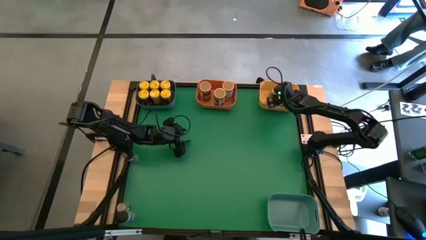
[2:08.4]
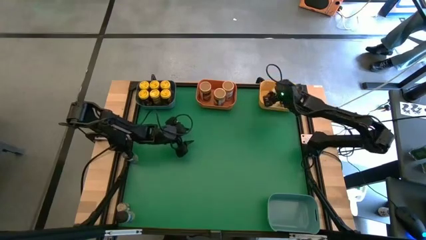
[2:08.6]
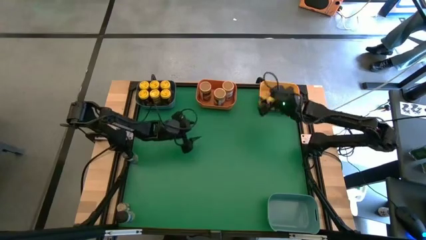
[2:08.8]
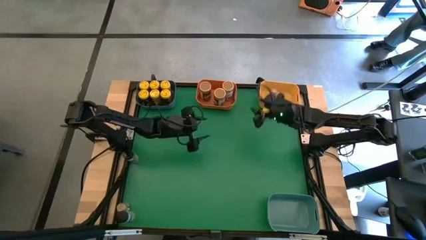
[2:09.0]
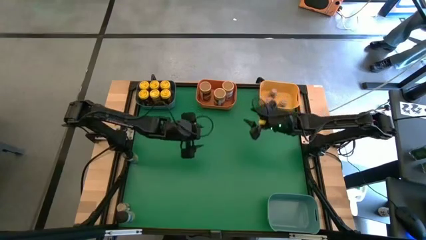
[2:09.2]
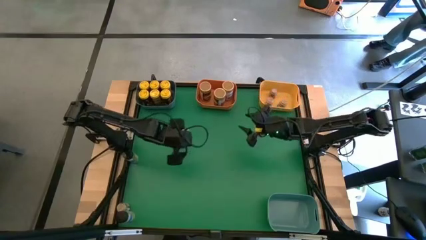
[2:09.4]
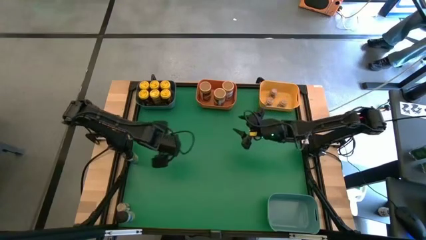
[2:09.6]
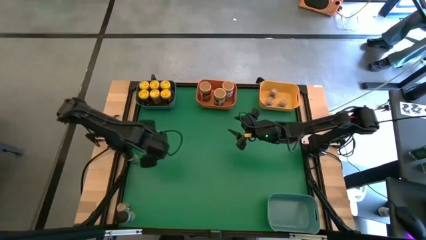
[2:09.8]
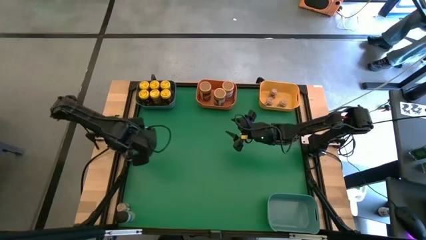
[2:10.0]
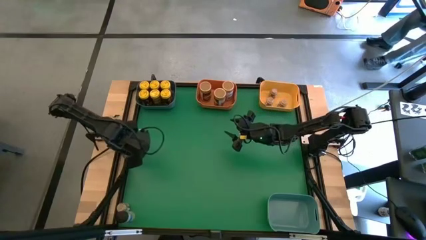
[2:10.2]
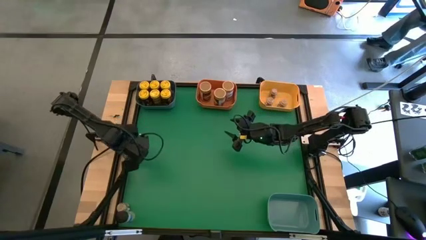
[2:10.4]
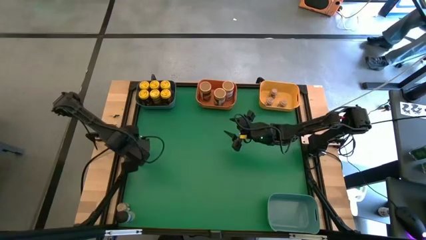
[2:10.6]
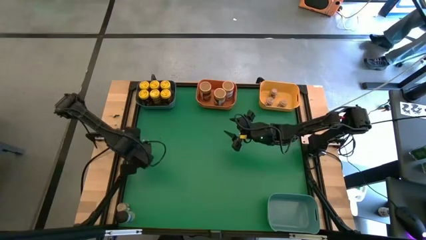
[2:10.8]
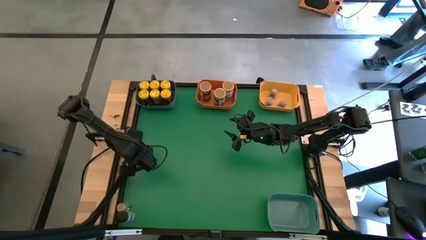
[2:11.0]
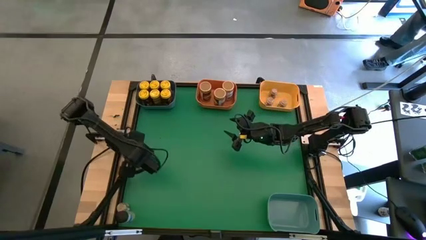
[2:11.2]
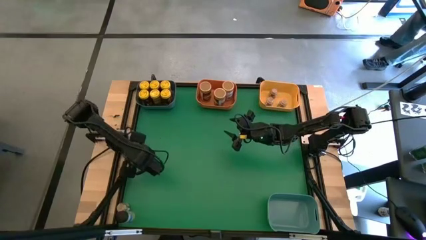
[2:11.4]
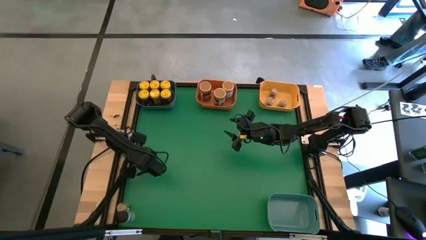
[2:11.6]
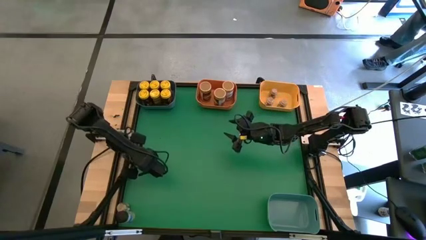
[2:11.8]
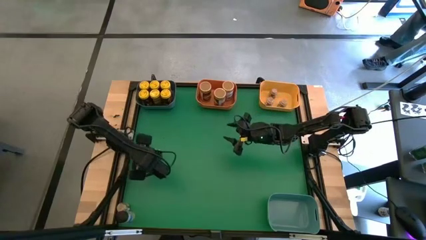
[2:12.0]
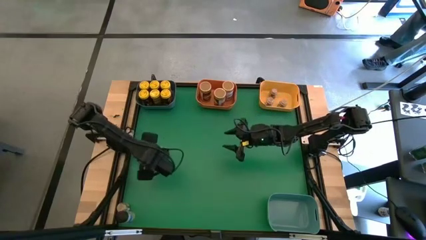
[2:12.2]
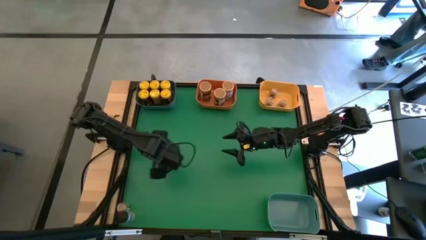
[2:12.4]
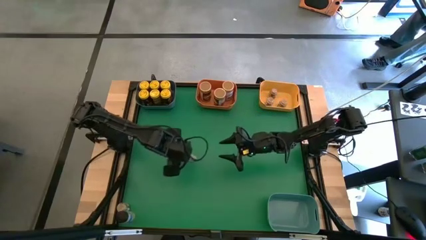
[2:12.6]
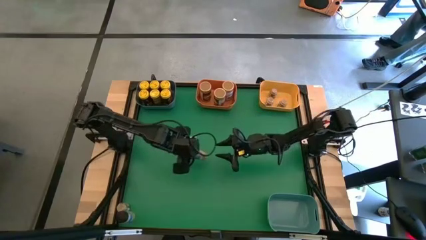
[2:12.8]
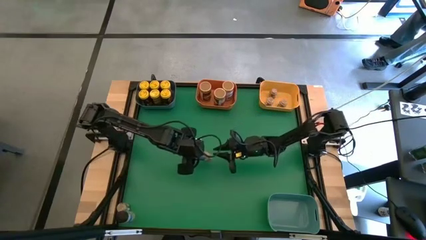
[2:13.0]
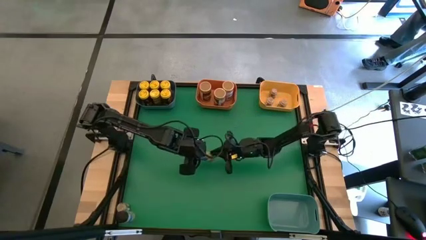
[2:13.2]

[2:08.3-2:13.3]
Task: Sort spices by type
Put the black seasoning bottle into the green bin

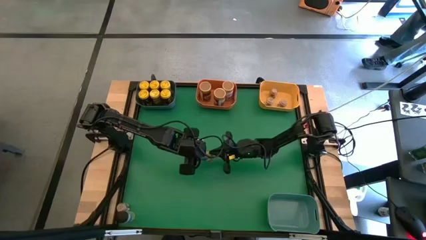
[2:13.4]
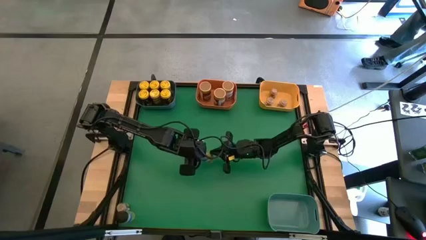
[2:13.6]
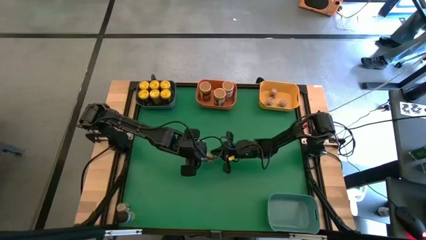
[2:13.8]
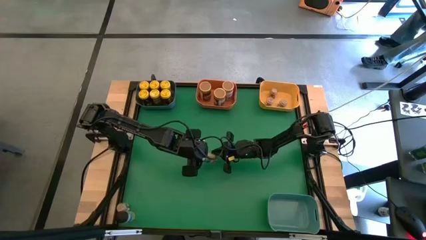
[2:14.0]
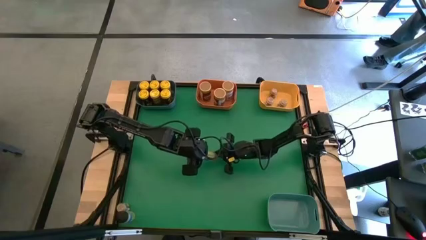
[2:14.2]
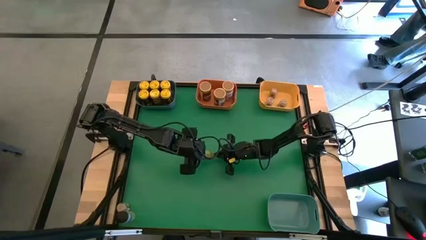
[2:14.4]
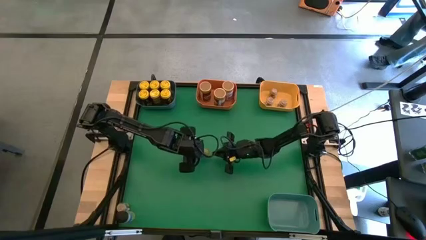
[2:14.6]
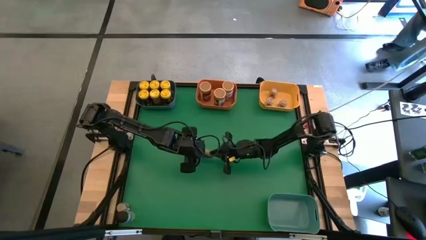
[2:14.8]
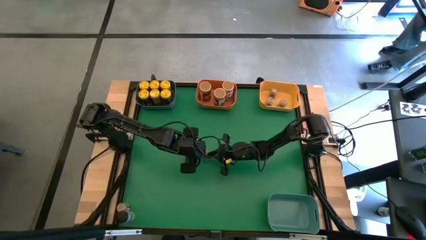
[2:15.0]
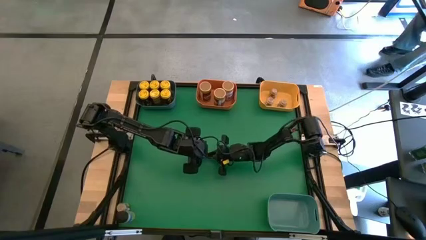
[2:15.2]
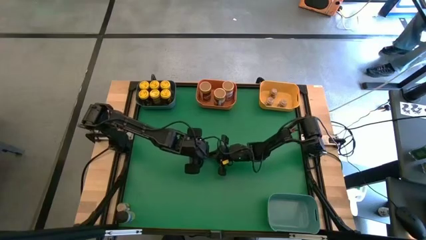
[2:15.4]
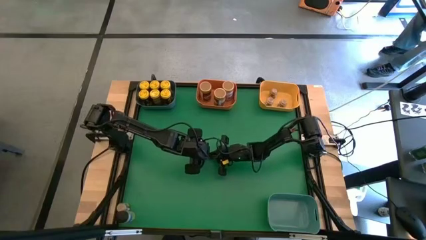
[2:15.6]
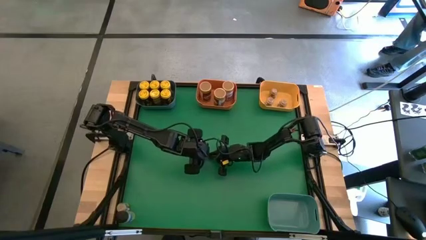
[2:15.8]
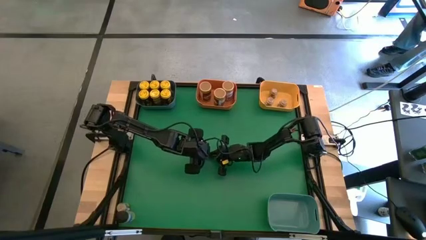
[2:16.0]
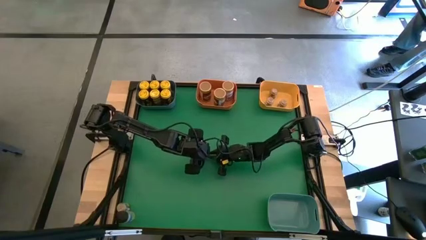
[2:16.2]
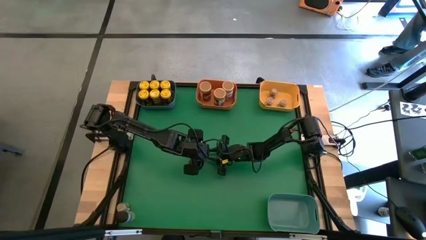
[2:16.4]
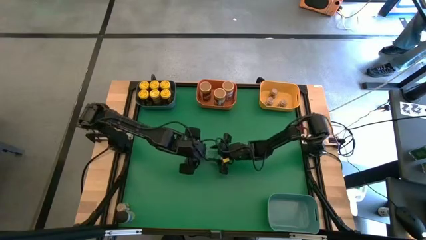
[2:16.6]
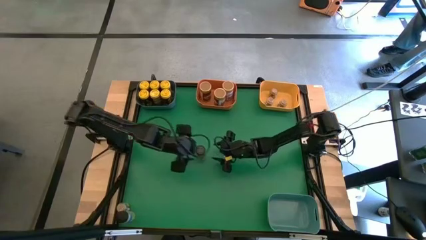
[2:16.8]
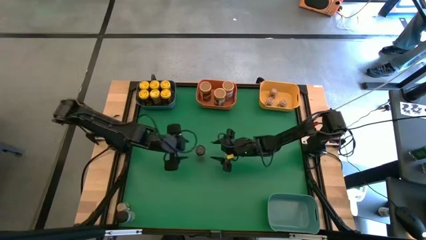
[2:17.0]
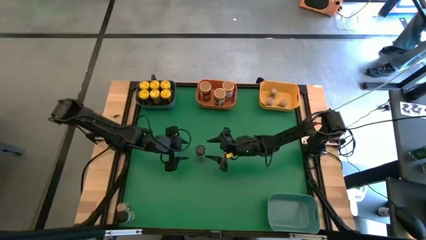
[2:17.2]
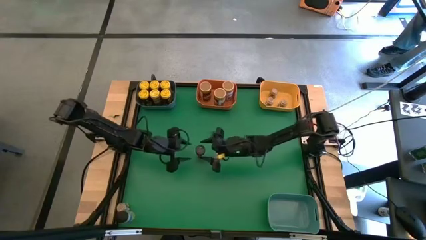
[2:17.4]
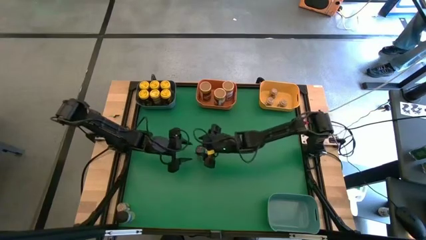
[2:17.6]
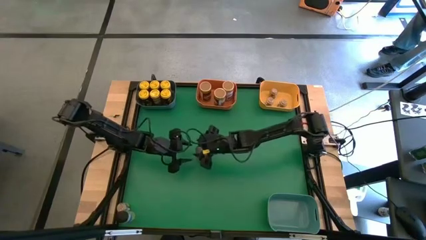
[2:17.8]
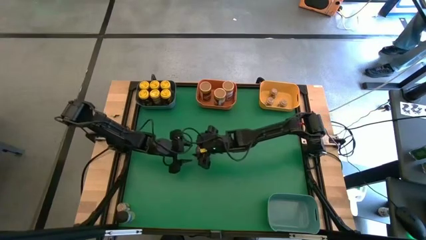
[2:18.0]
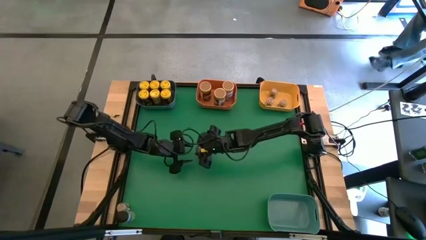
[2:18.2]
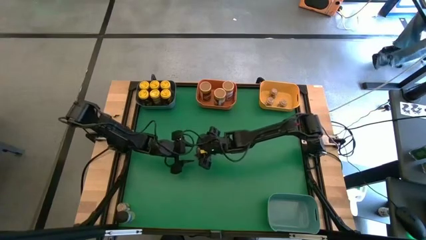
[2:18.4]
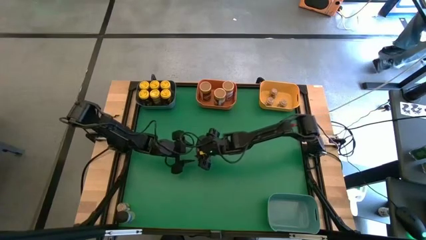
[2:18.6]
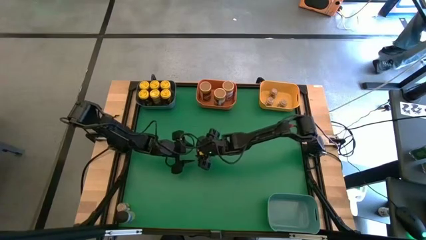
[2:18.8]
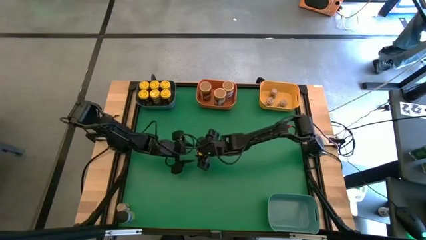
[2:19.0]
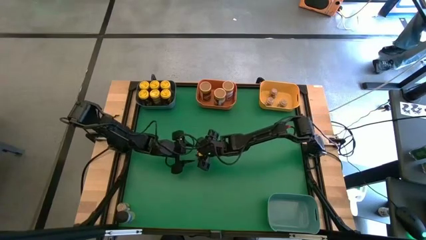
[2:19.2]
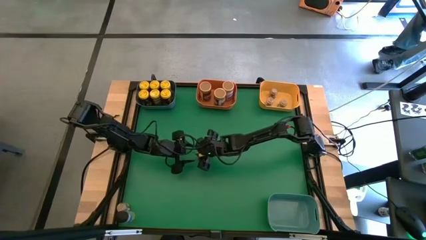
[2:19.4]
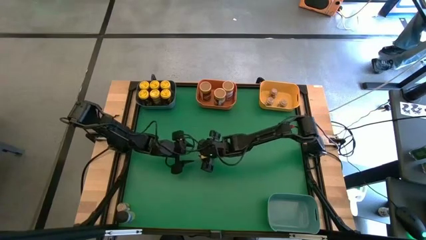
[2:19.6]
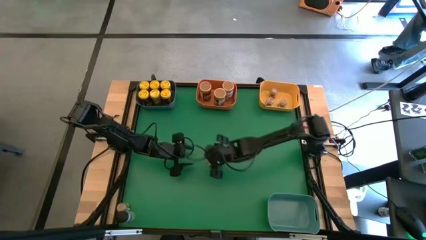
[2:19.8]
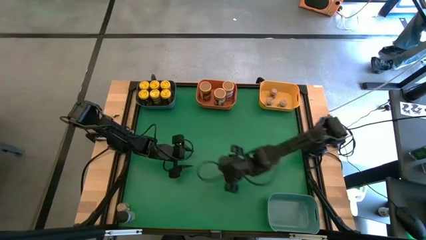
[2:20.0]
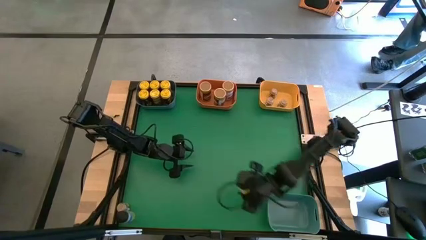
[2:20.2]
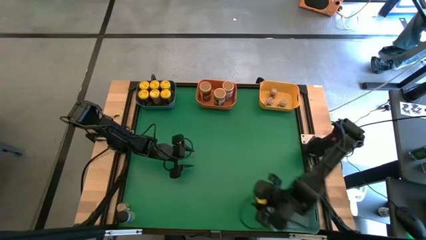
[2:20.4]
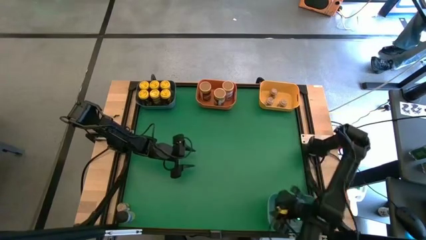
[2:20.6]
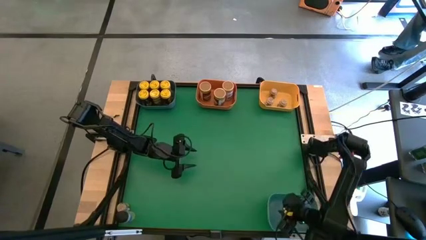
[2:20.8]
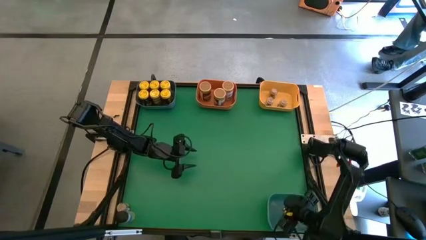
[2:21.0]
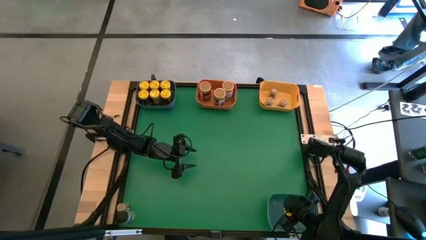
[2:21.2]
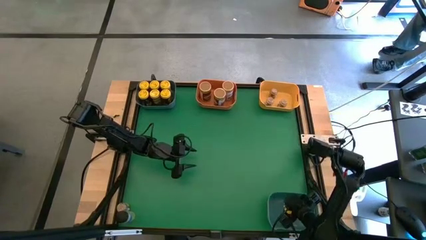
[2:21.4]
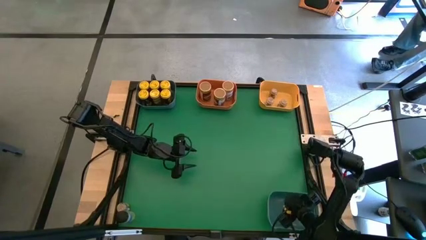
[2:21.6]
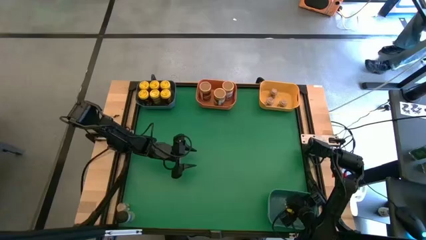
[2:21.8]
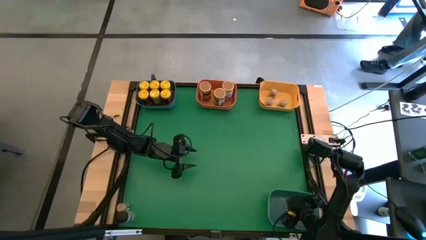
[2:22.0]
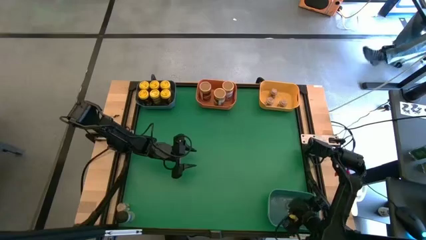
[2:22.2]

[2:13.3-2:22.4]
Put the black seasoning bottle into the green bin

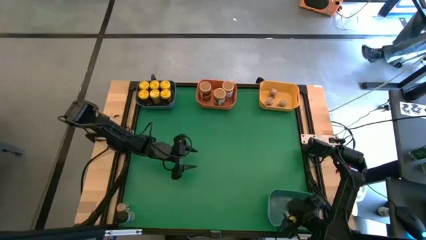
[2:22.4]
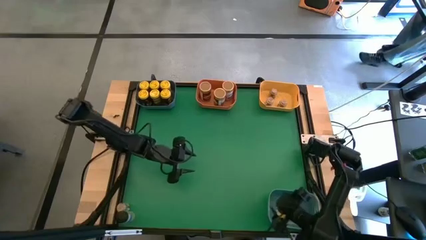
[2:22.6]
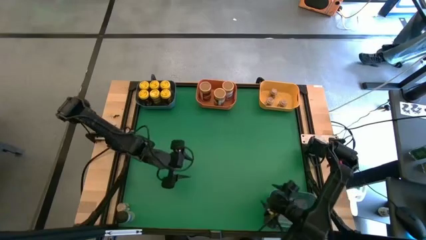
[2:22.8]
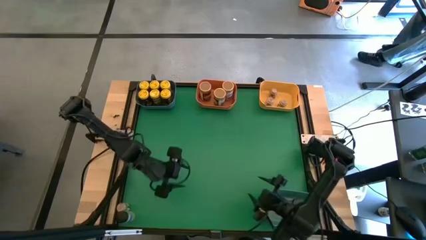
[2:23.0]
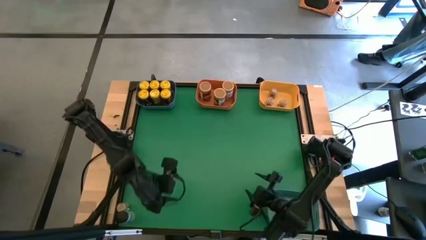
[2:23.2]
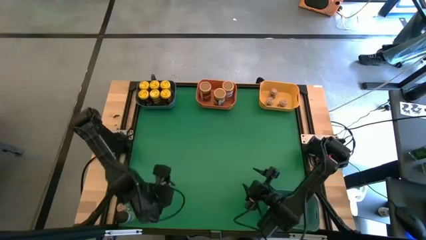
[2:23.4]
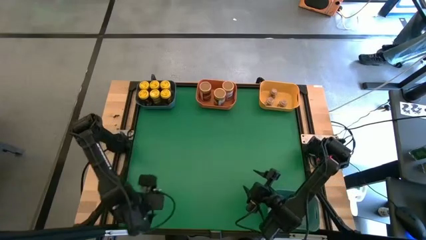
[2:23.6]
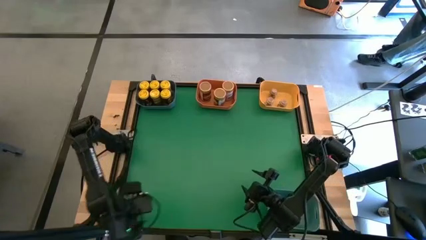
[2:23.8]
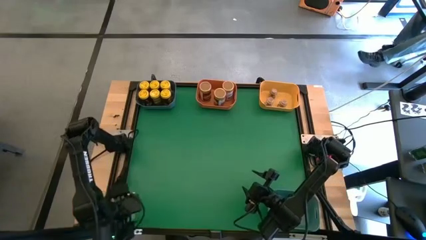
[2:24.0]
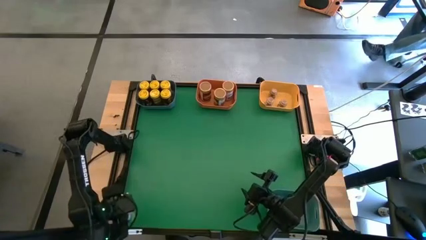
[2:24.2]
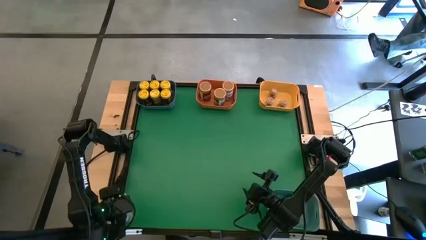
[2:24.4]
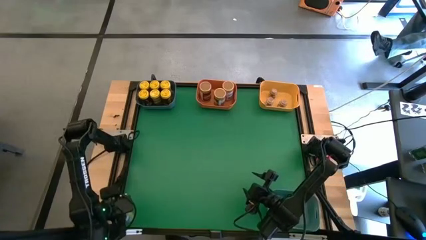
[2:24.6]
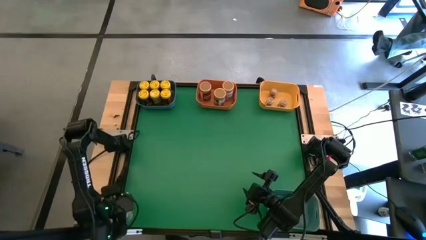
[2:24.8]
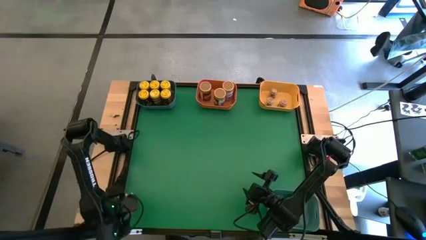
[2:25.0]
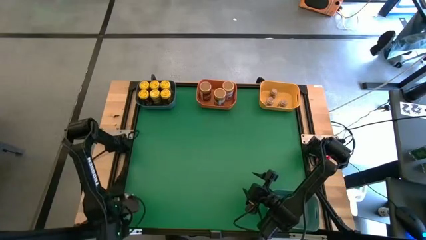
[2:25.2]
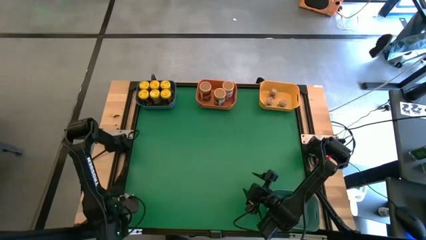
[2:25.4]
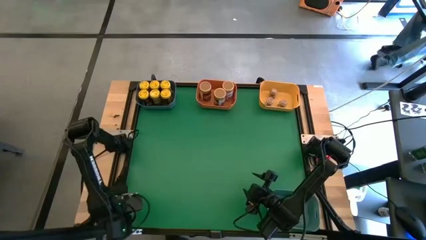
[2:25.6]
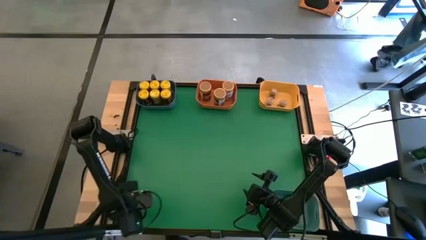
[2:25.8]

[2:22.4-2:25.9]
Put the black seasoning bottle into the green bin
